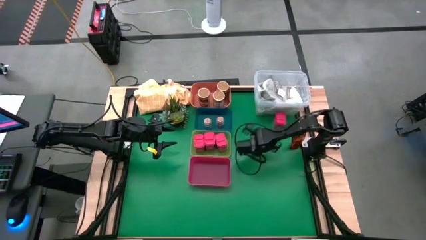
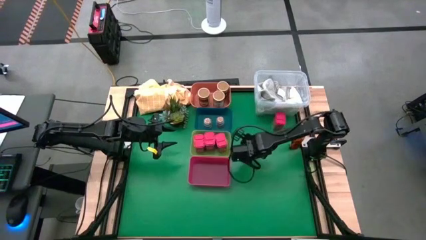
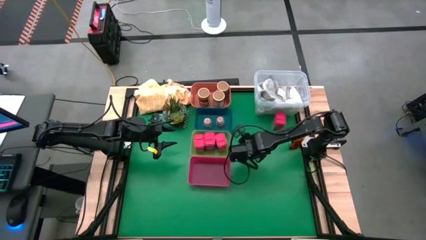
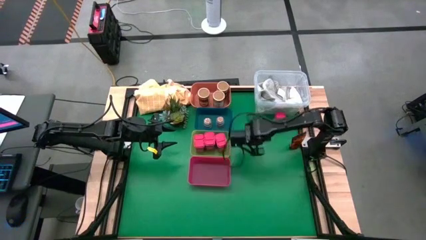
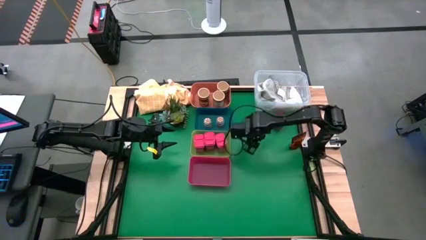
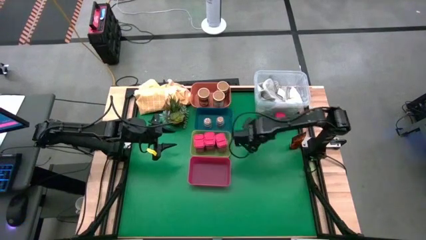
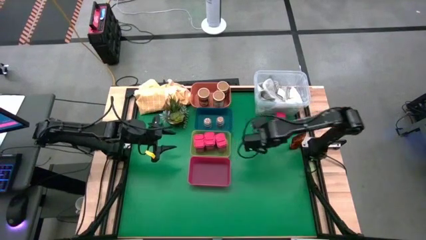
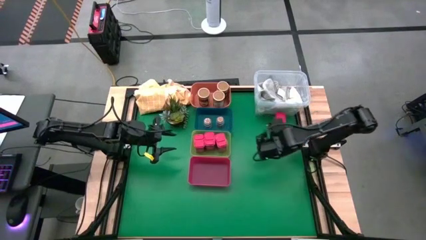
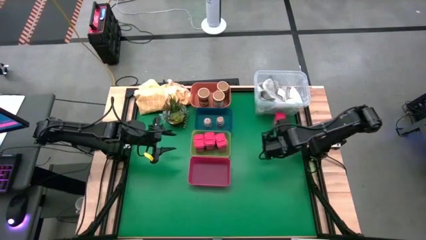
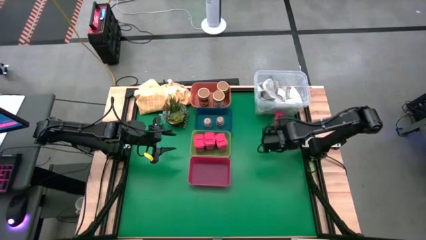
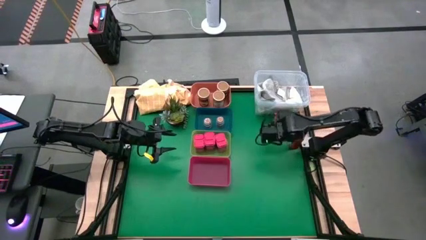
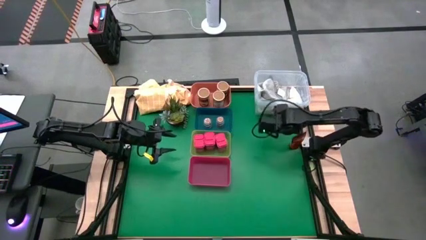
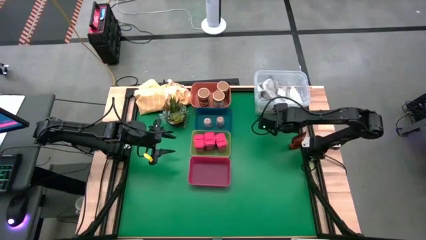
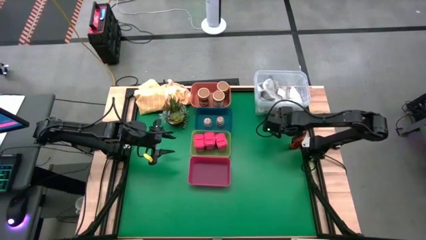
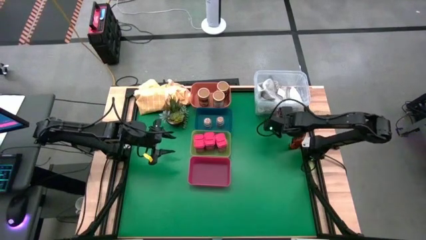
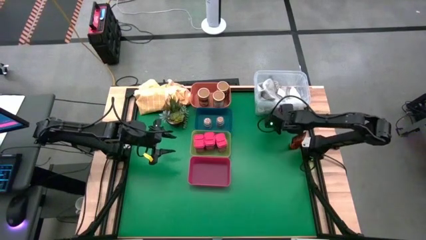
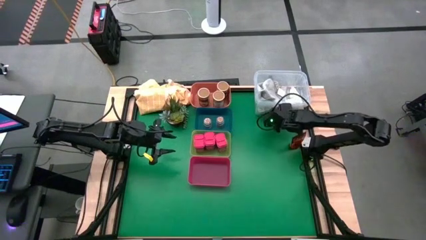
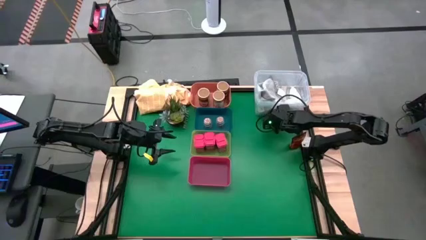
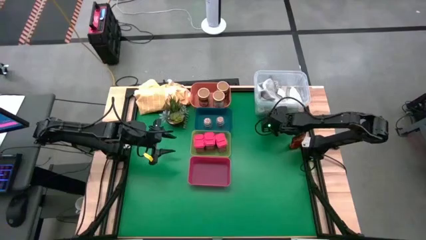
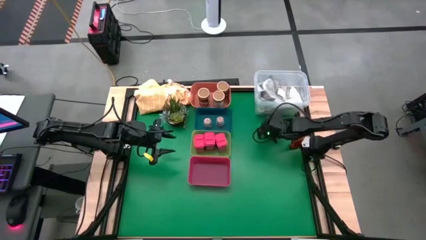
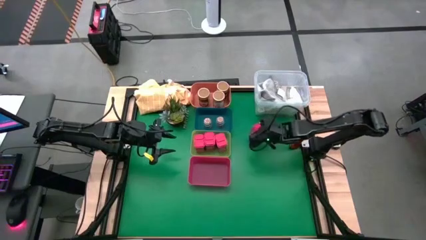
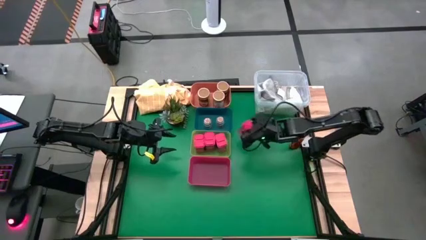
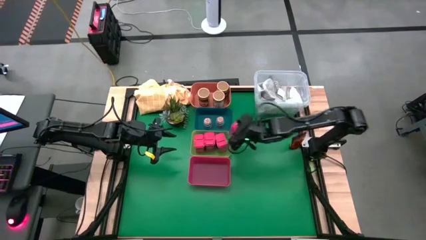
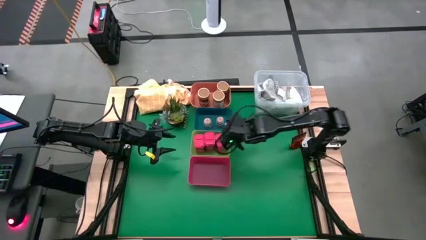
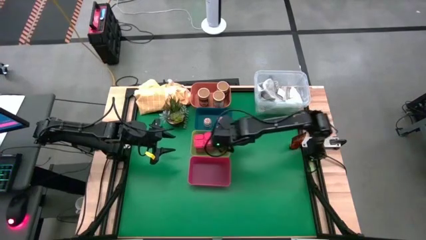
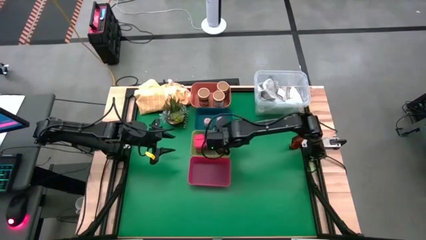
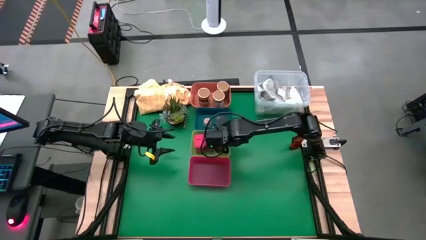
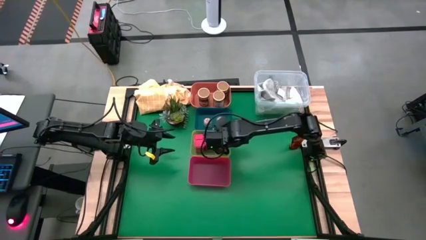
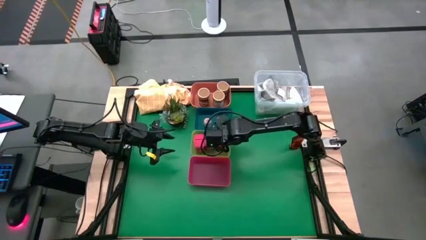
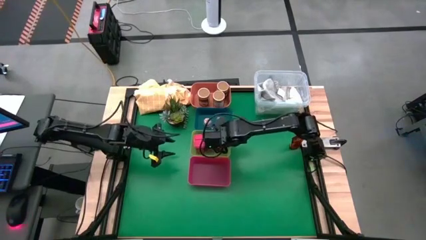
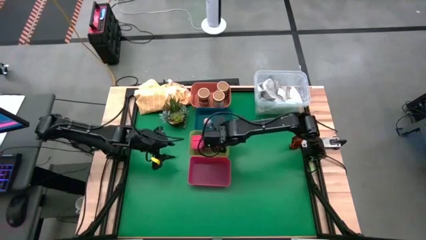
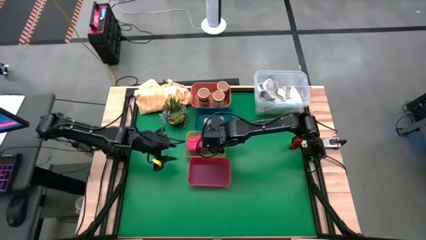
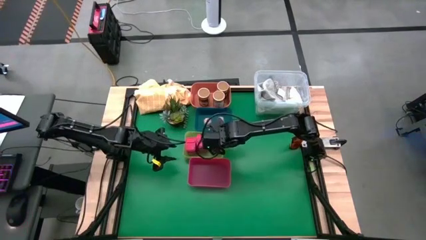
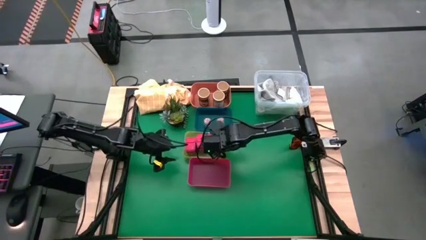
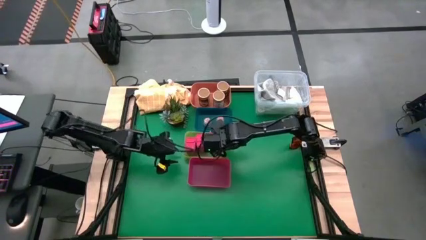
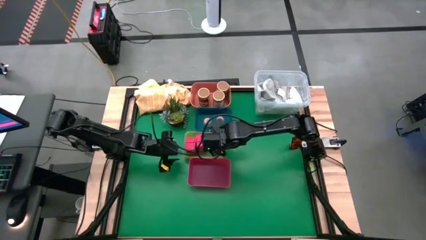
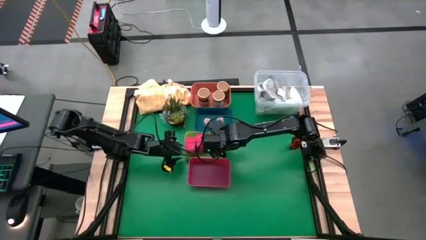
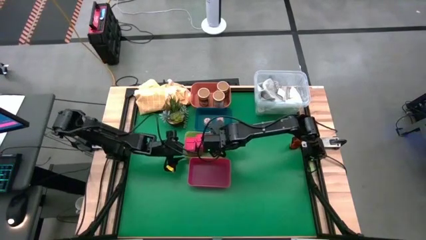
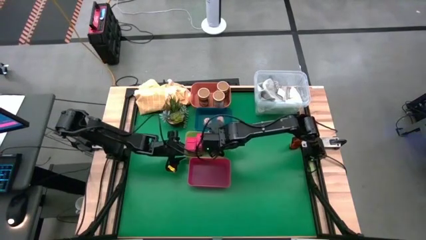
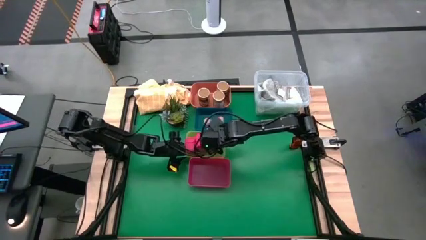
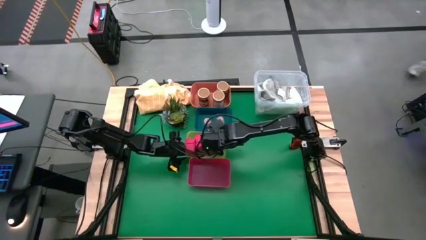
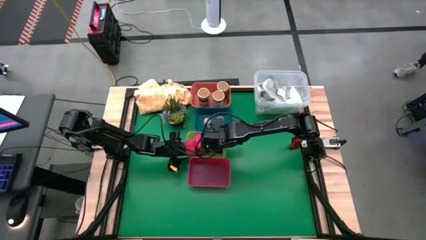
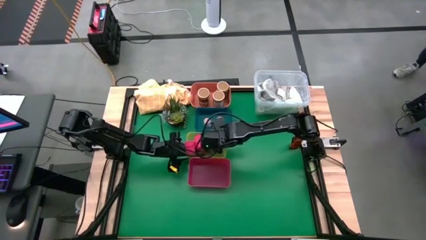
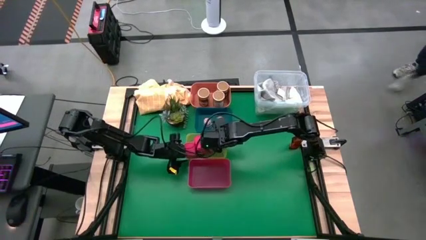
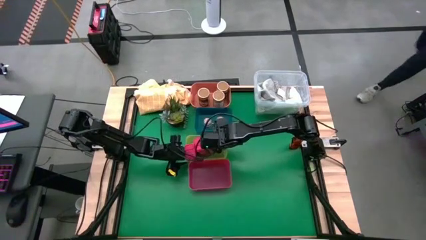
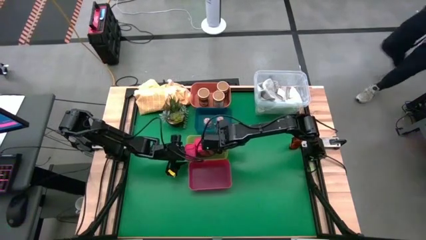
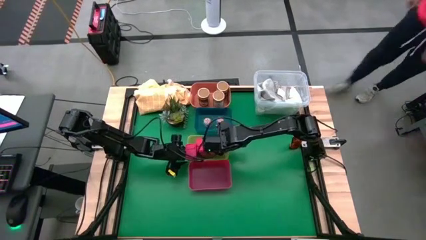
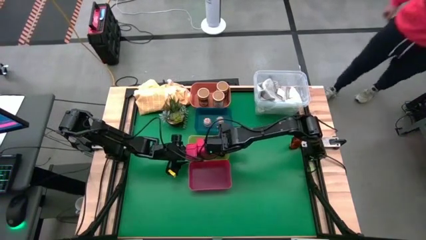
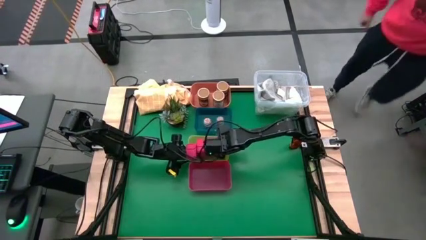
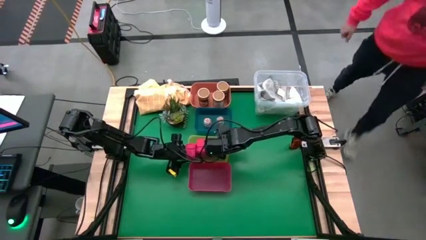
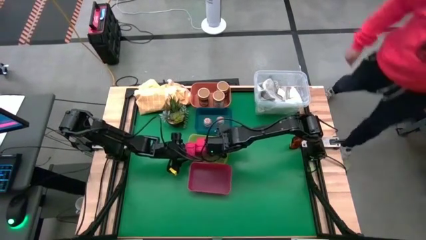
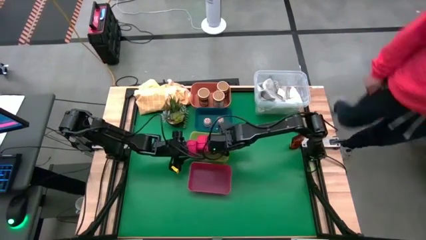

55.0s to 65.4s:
Task: Sort spices by type
Put the red spice can into the yellow bin

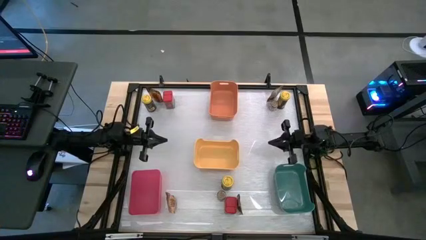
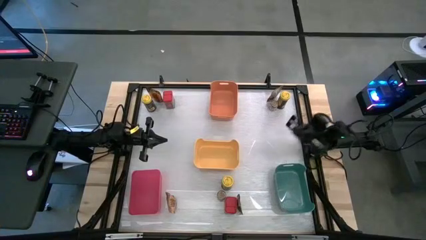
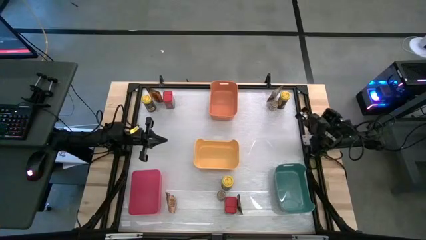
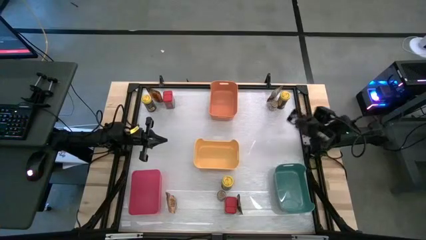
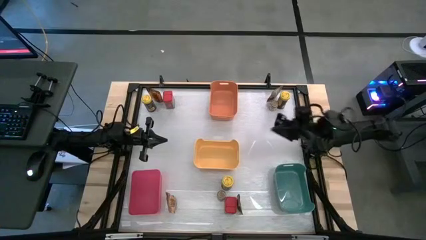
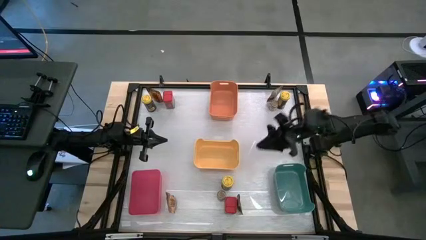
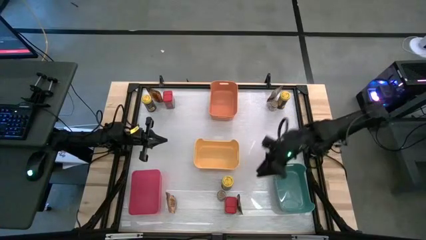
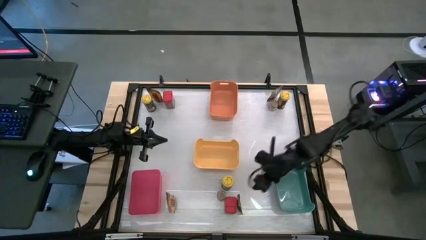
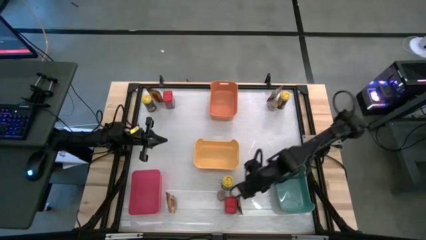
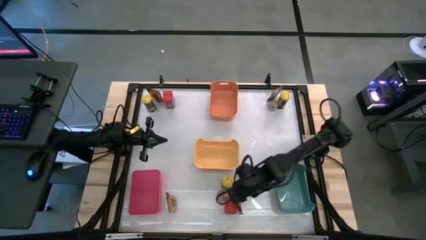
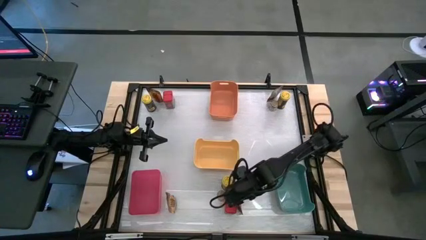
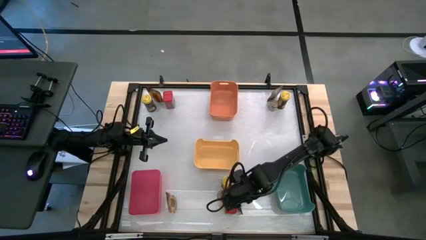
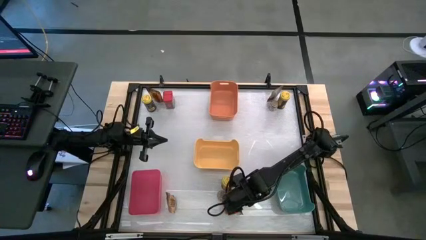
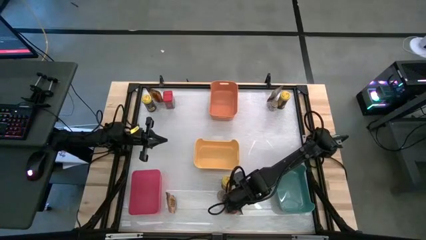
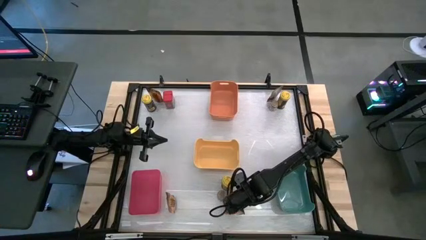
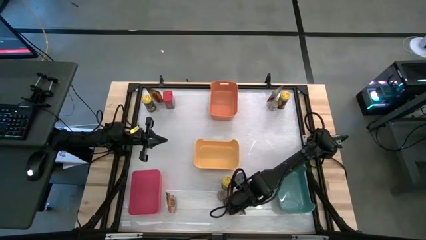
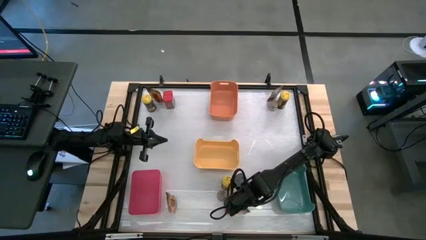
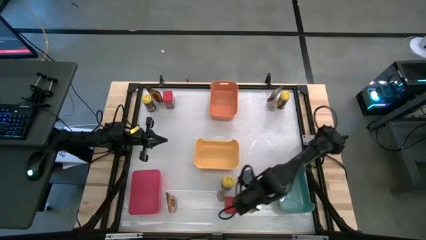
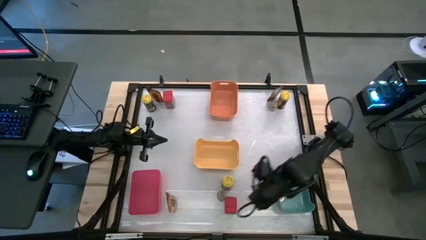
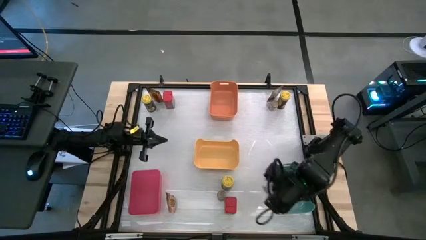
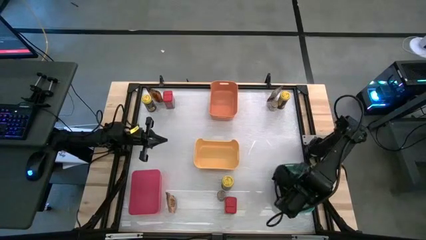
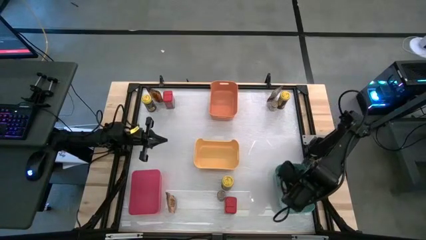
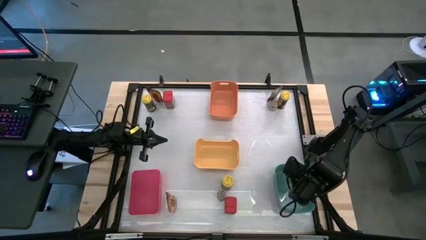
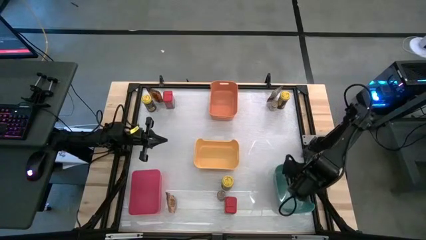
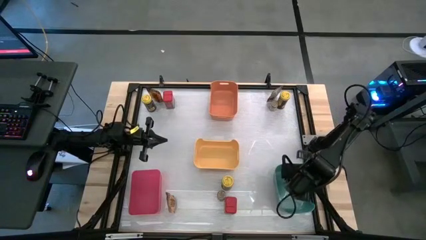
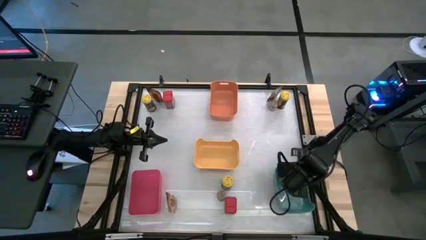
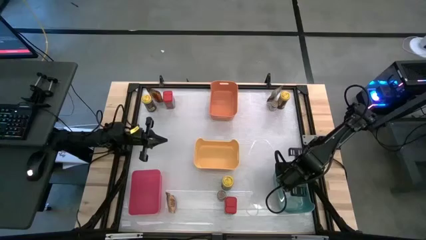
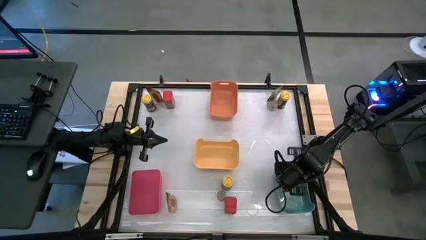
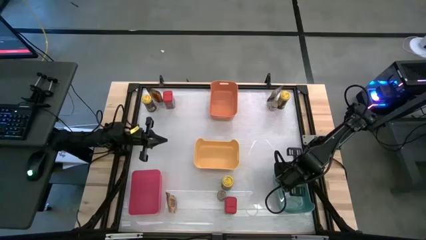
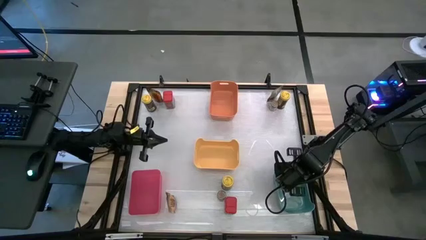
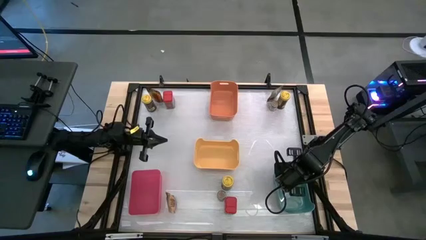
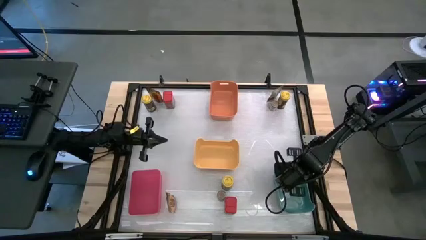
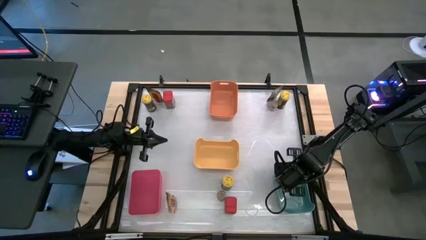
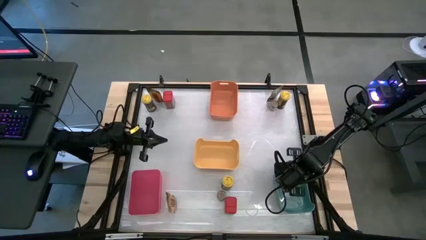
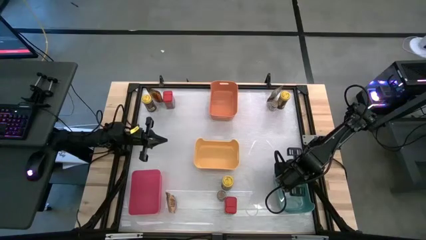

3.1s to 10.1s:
Task: Sort spices by type
Put the bottom right orange seasoning bag into the blue bin
